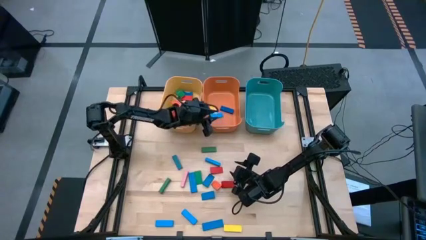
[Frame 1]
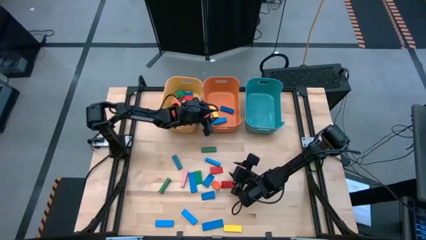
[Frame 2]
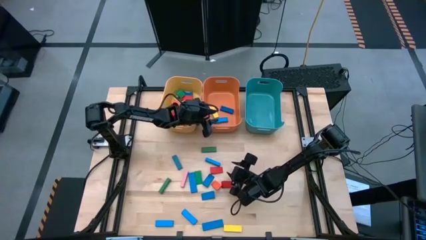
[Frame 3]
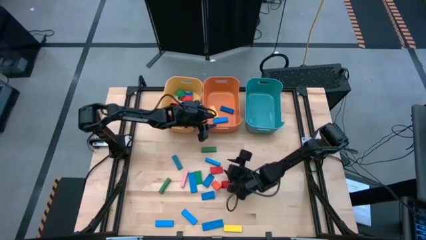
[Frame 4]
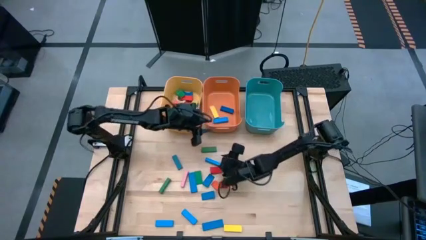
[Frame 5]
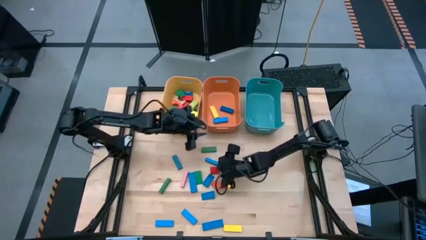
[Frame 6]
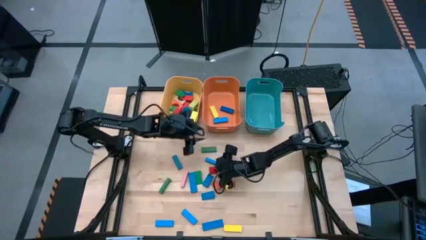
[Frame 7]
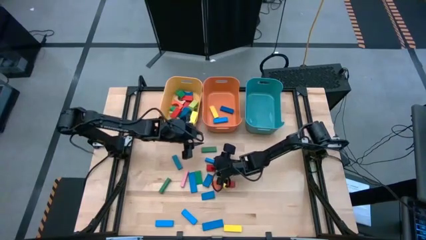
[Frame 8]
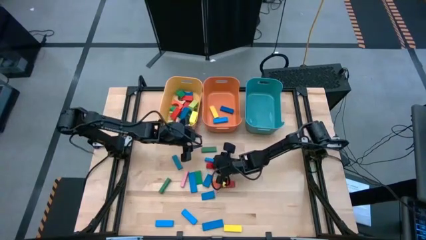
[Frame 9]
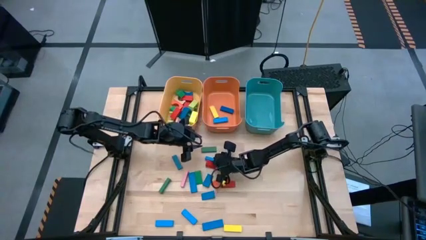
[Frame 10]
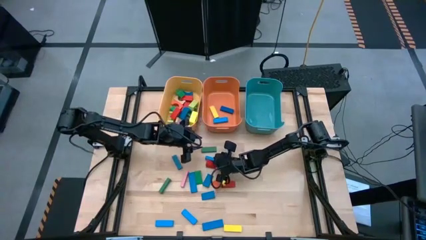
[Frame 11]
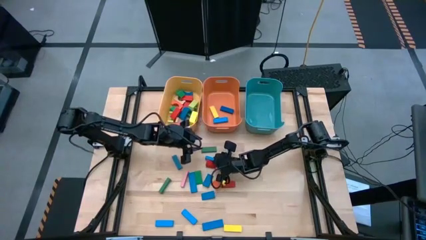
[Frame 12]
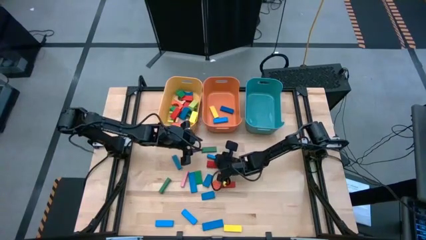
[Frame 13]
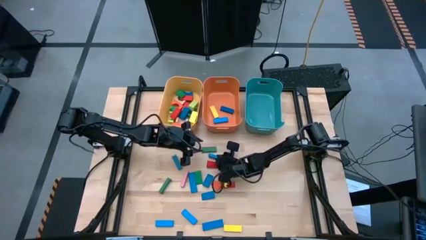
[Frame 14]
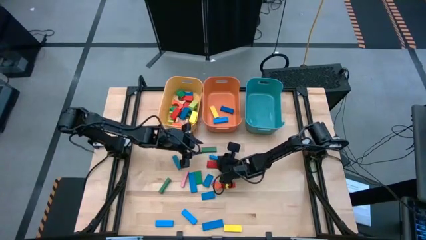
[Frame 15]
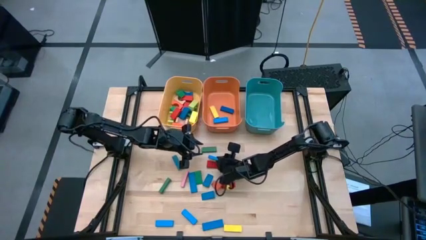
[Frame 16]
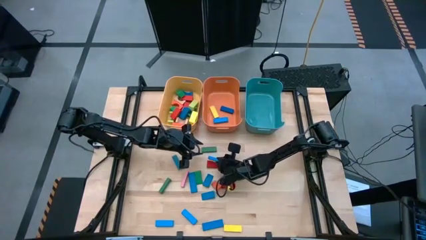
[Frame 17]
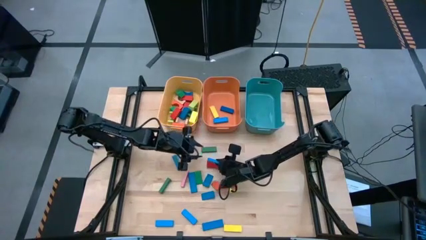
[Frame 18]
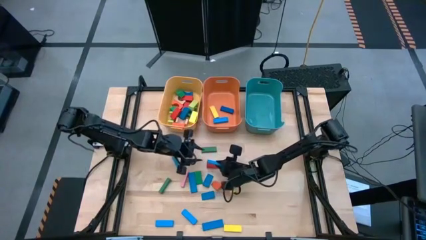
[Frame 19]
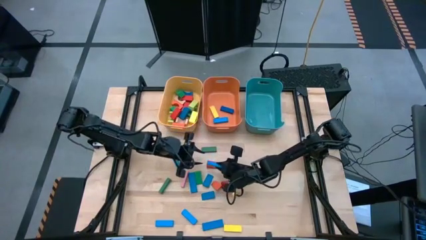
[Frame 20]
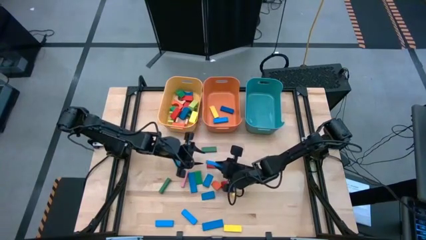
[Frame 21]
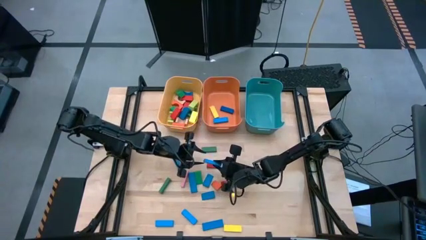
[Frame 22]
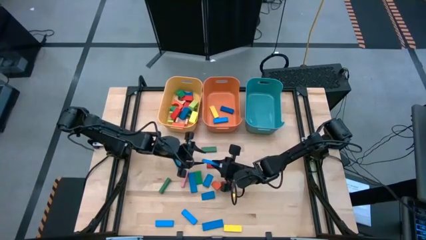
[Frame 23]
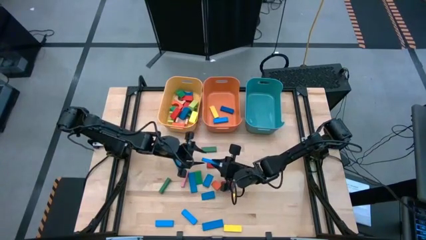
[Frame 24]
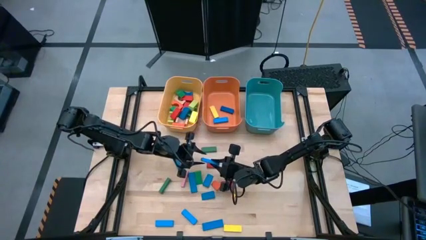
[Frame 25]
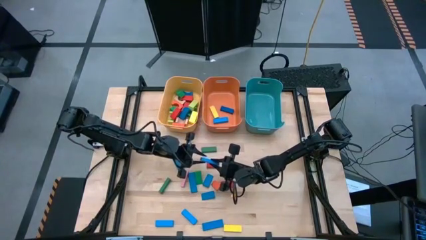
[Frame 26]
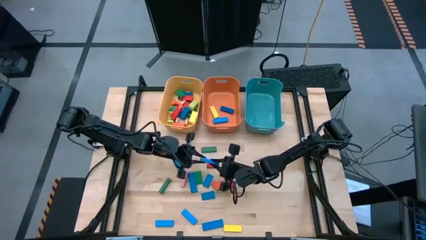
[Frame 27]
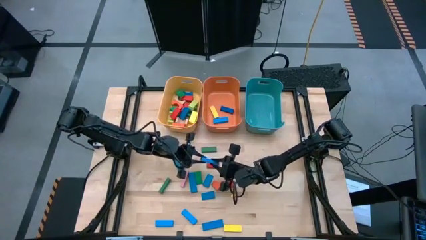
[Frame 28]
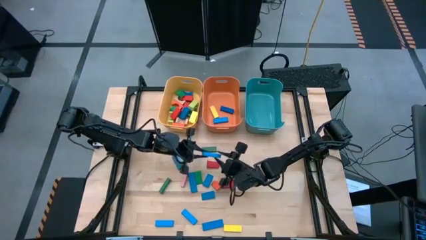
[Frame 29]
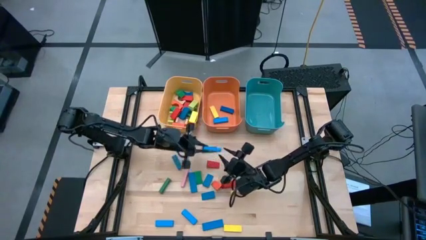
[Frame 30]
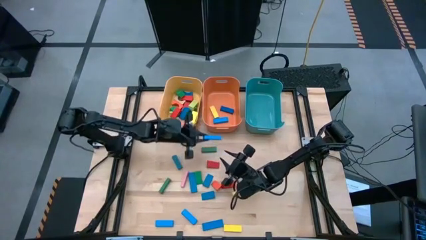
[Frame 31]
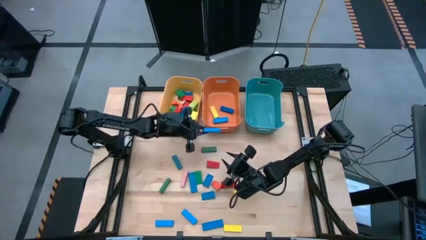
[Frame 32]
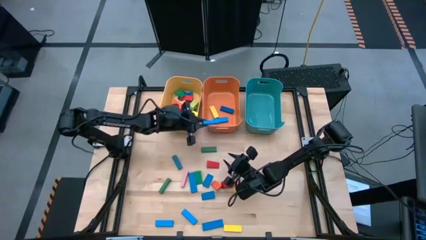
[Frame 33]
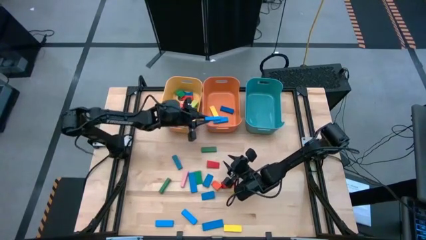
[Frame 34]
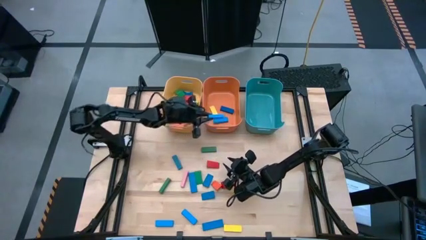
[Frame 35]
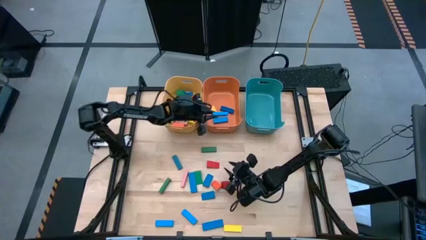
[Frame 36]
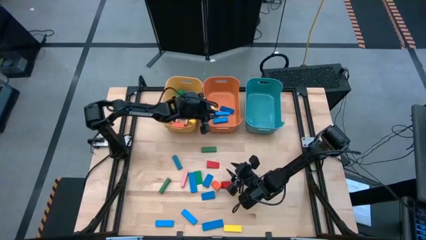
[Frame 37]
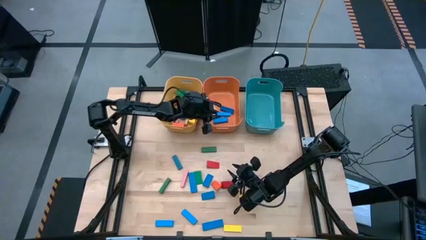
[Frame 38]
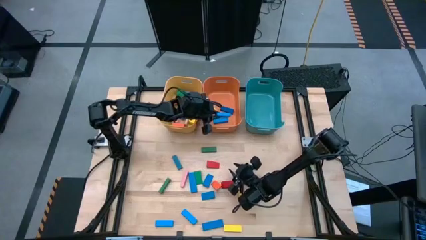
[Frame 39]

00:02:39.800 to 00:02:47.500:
Task: Sort blocks by size
Put the blue rectangle block into the orange bin

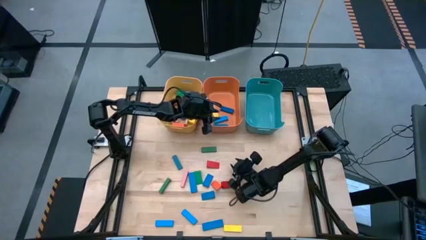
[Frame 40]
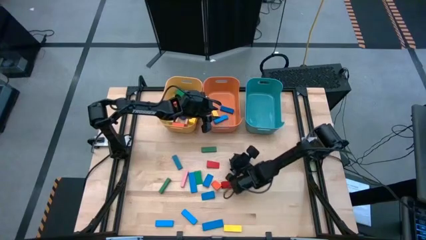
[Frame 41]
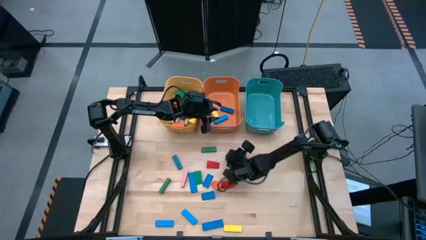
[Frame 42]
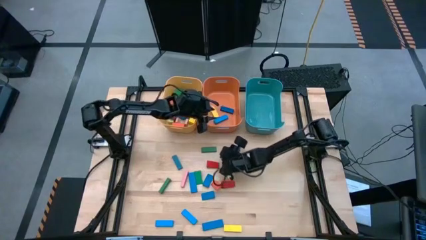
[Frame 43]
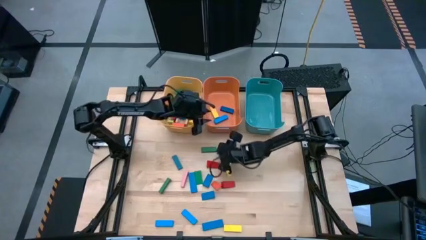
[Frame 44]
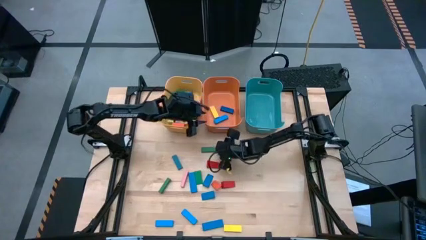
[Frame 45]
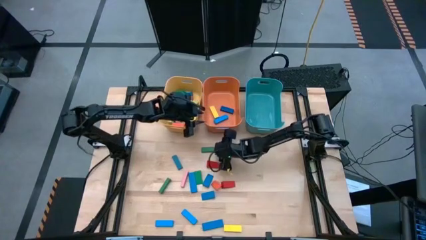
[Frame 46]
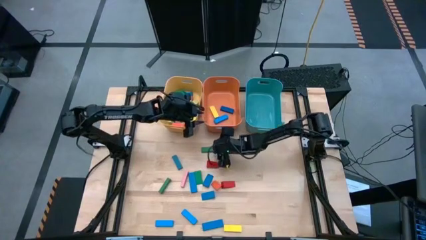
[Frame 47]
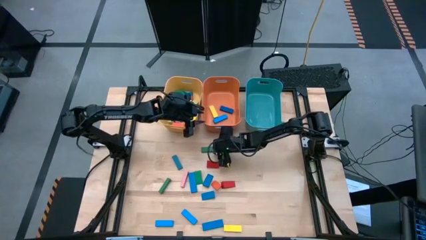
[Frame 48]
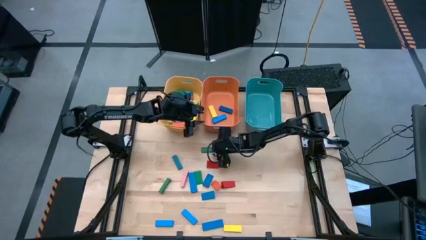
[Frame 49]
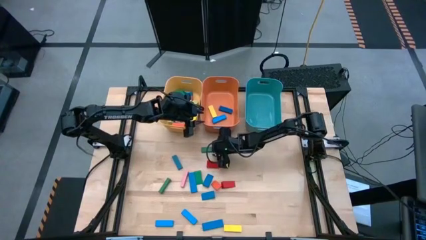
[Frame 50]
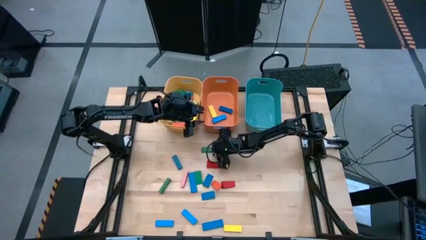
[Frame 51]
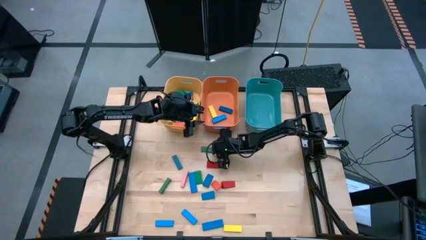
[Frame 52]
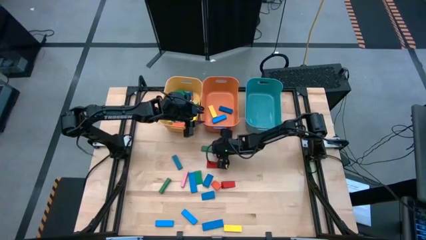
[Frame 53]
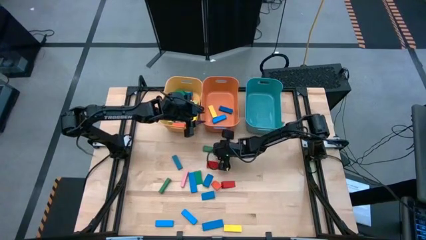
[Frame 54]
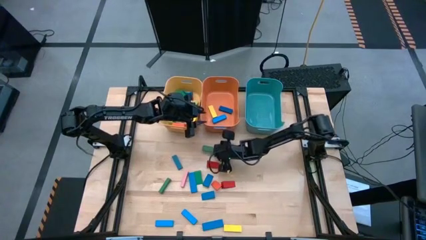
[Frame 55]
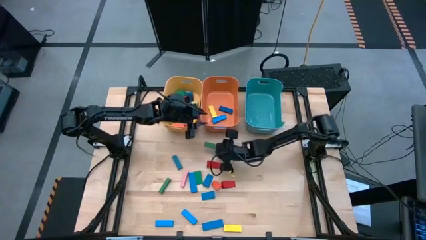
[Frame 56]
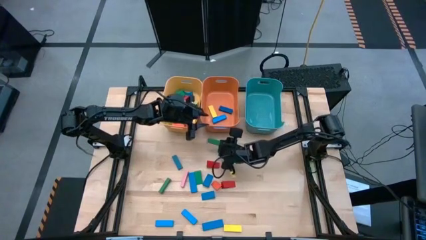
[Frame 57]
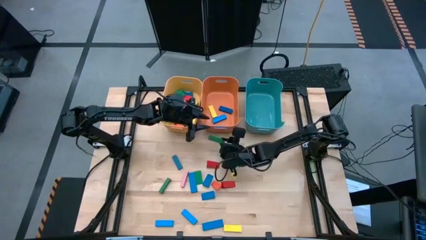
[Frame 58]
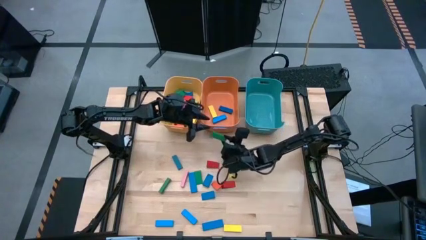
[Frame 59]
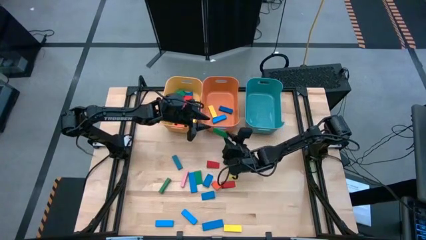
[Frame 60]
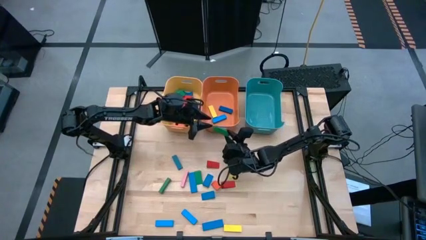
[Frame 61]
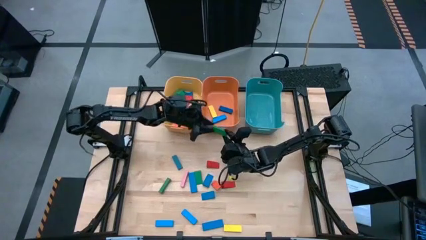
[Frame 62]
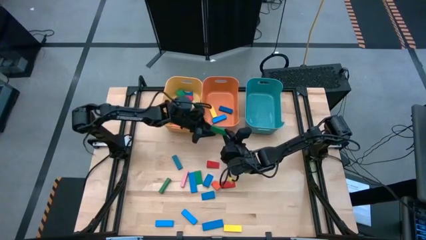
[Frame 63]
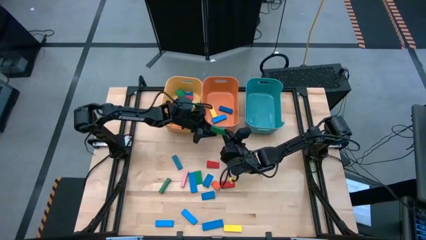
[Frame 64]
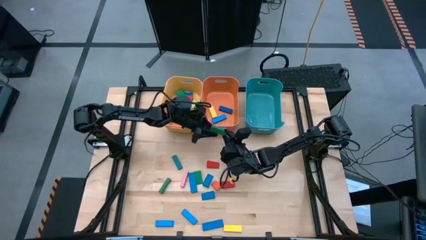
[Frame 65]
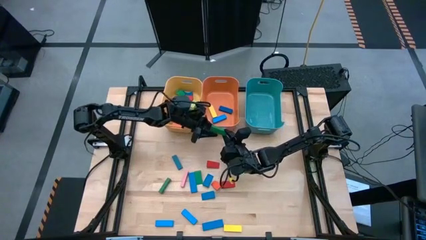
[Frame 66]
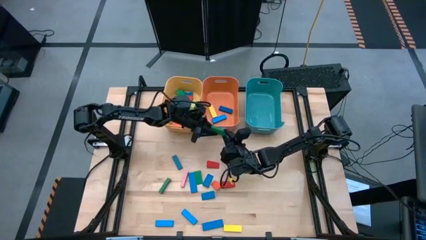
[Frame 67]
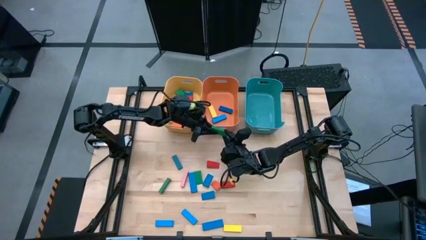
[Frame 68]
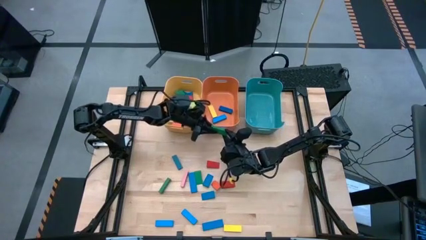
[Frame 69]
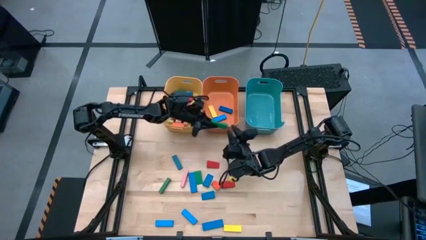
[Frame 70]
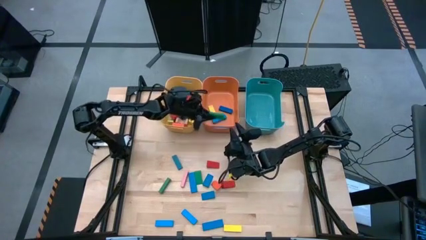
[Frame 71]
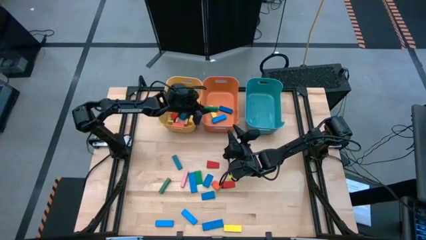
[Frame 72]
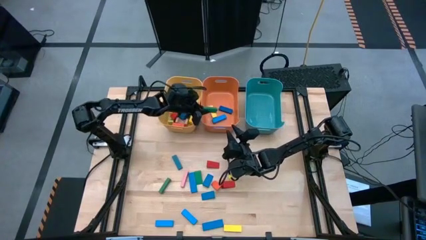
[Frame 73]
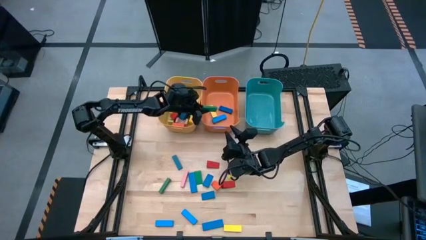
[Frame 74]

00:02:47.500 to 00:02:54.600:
Put the green rectangle block into the orange bin
